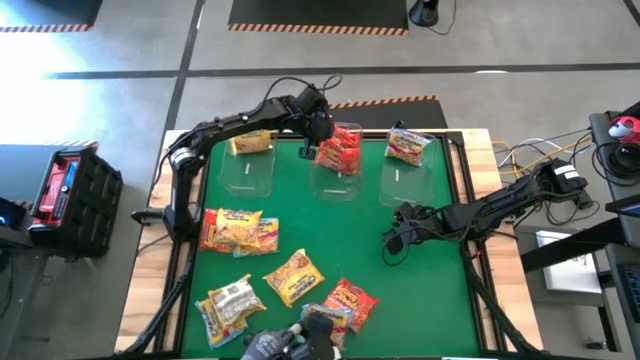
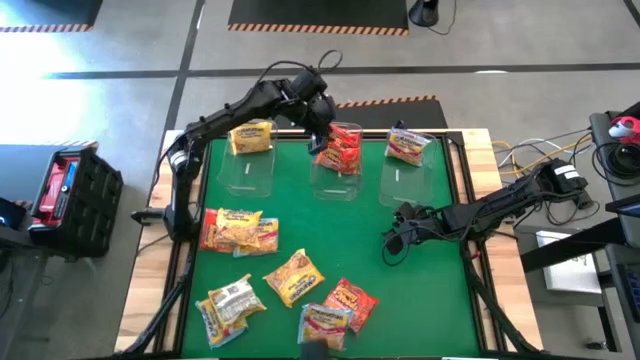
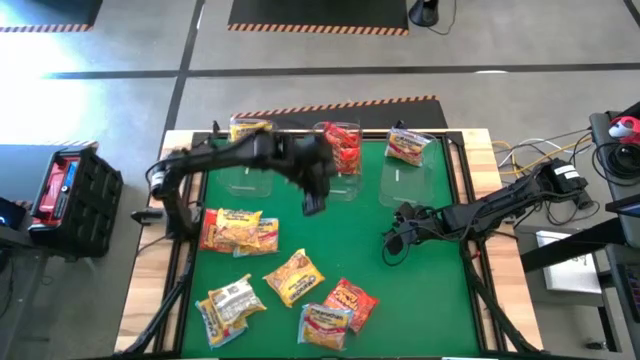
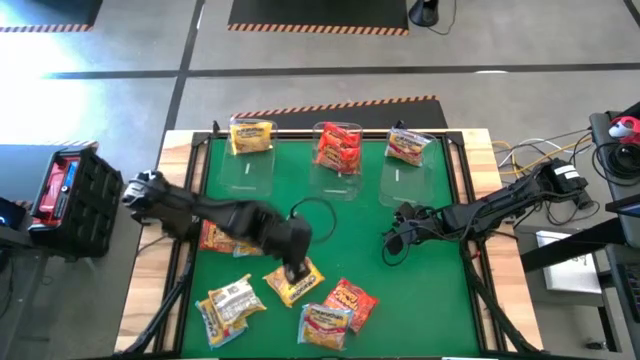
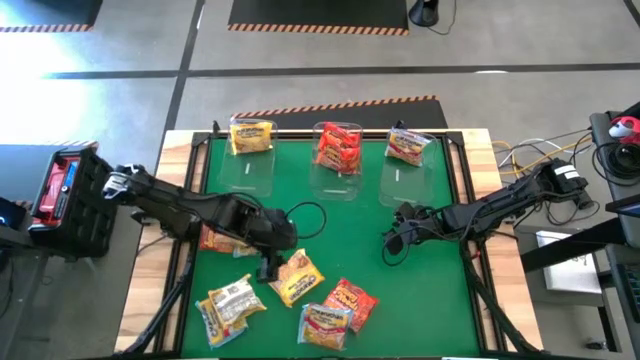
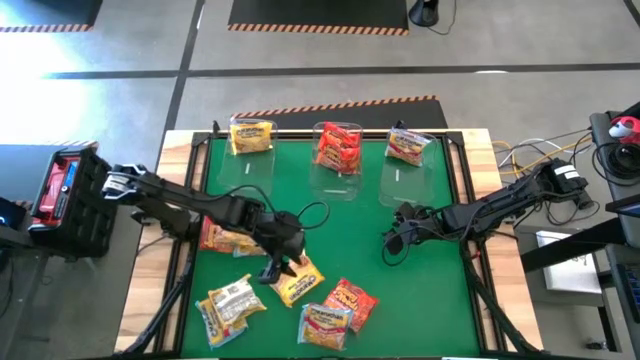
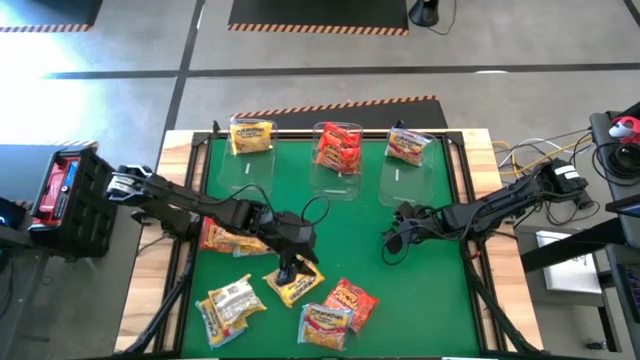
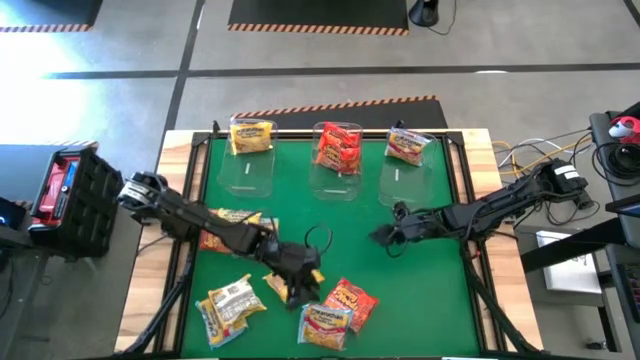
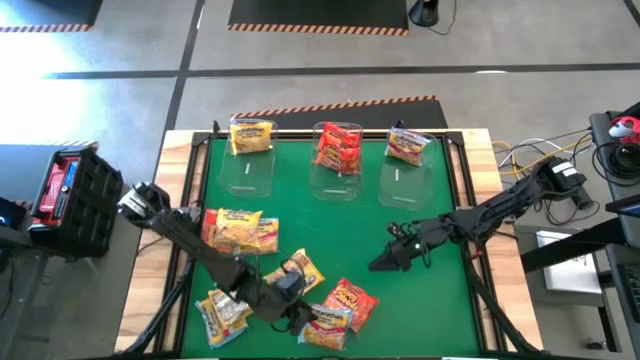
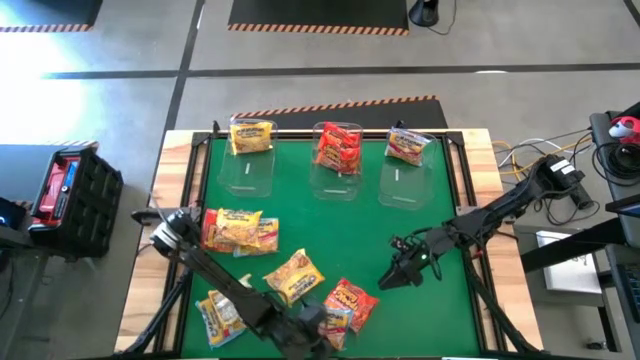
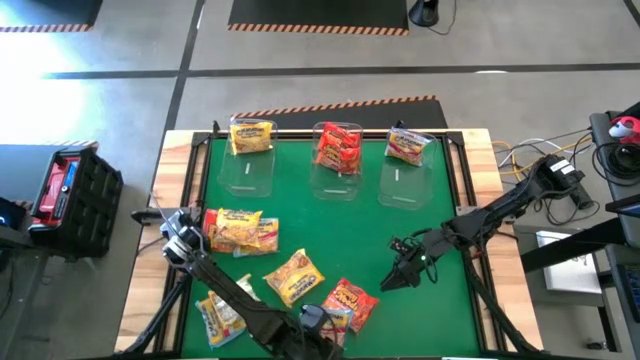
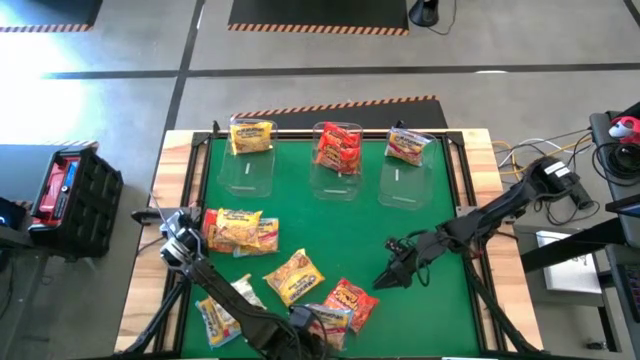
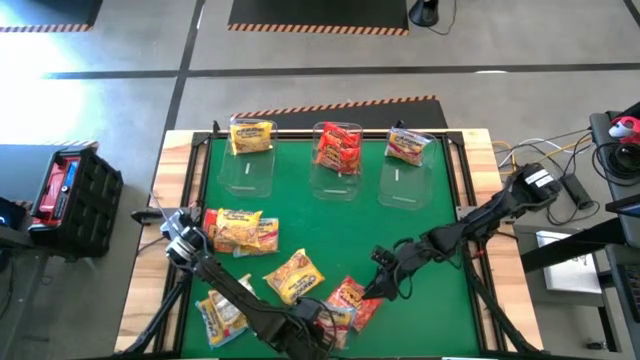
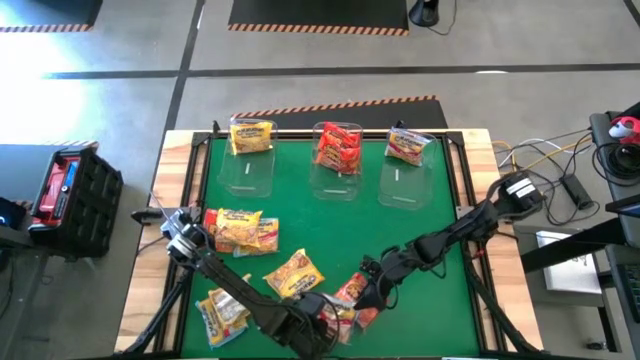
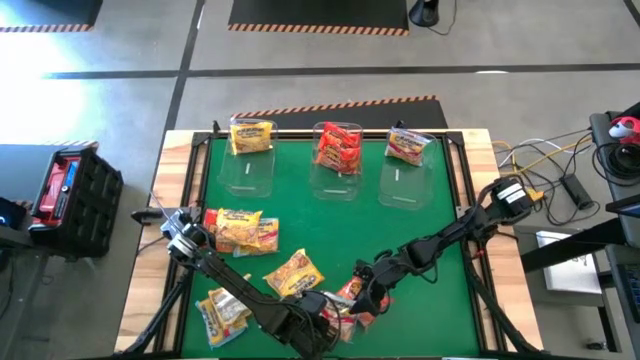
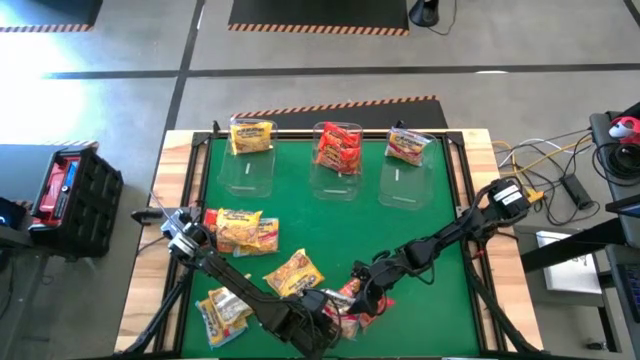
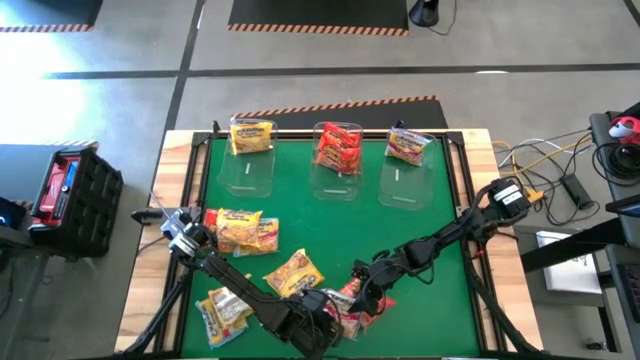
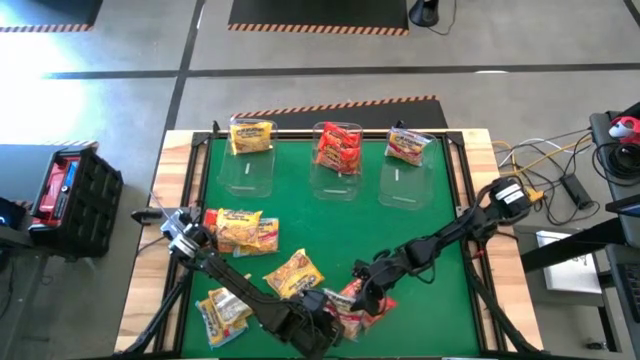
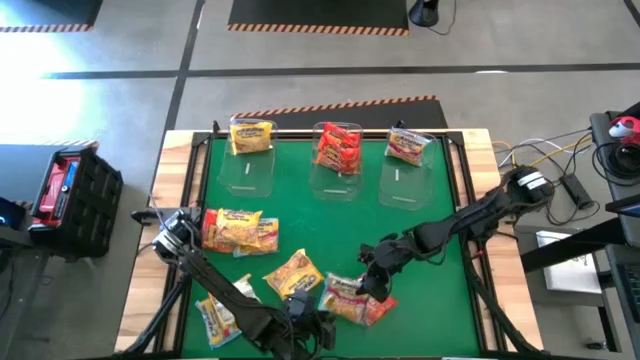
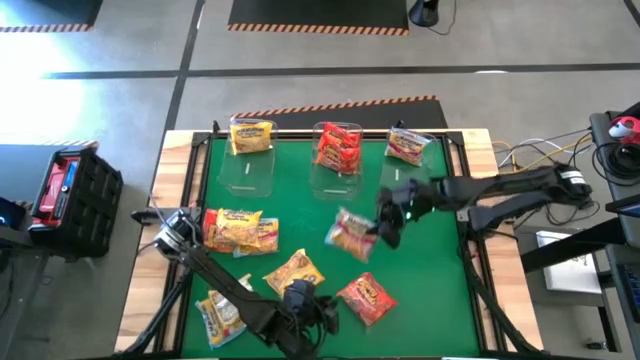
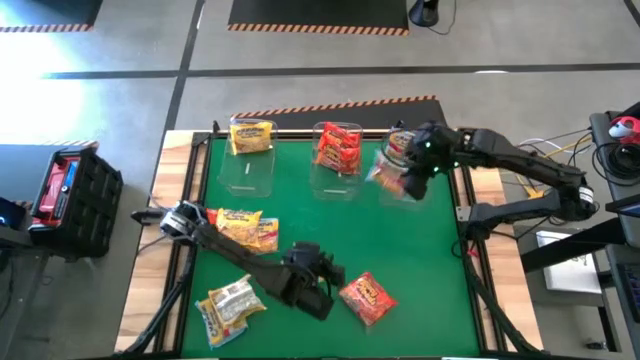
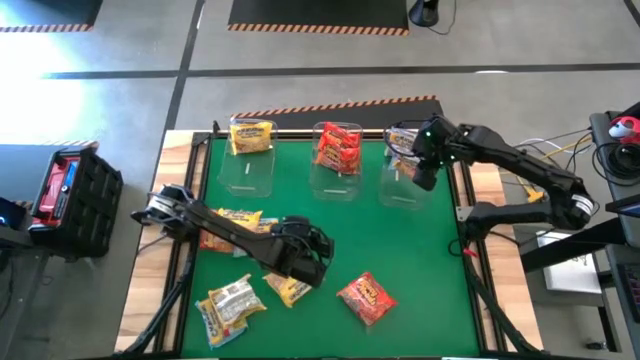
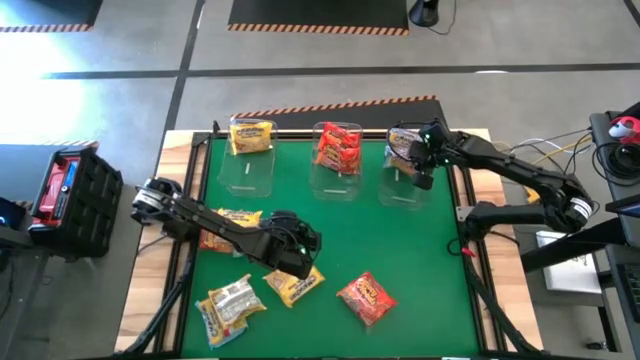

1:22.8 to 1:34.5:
Task: Sort Maruchan noodles
Put the blue noodle pack into the right transparent bin

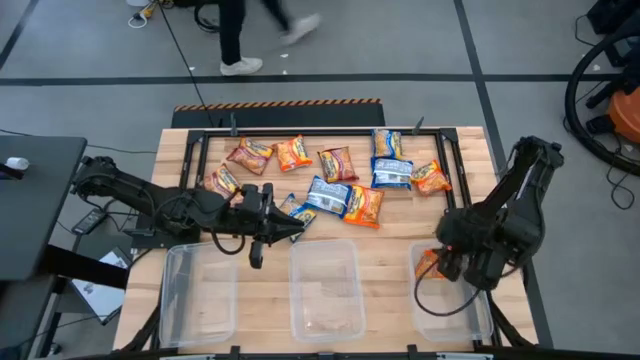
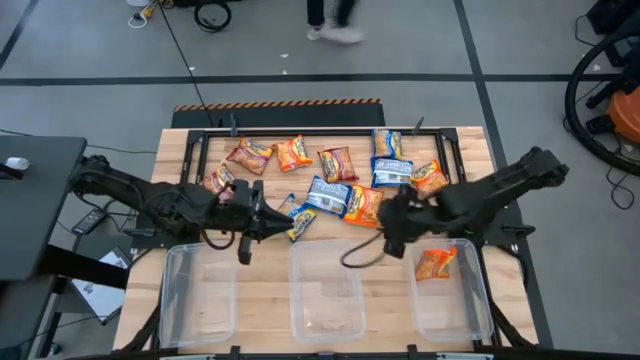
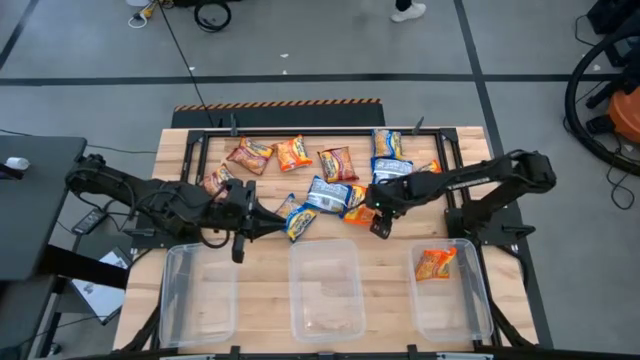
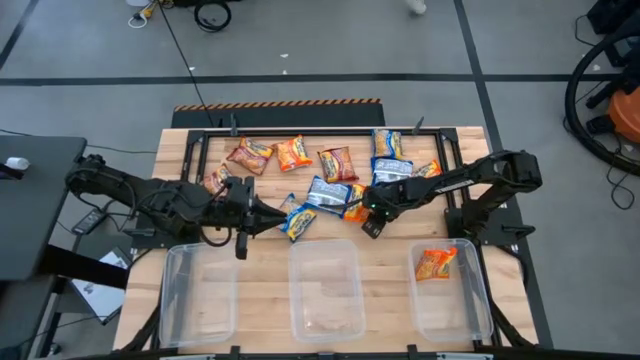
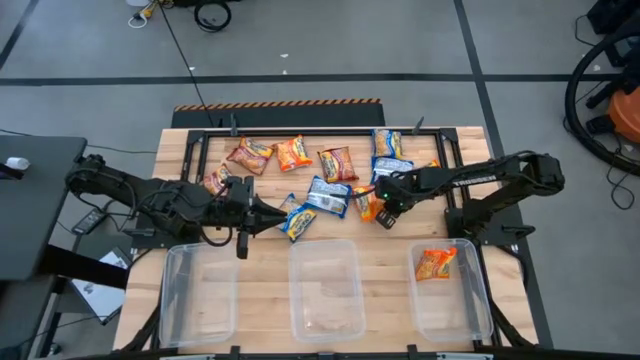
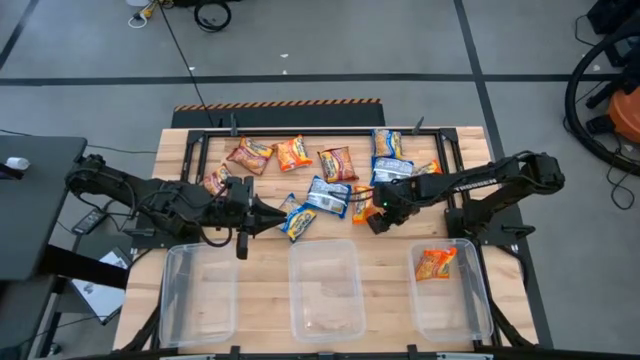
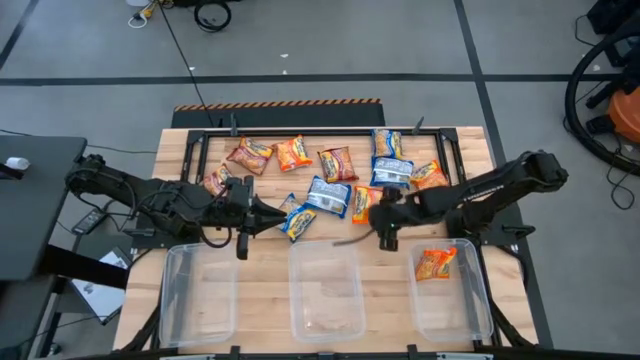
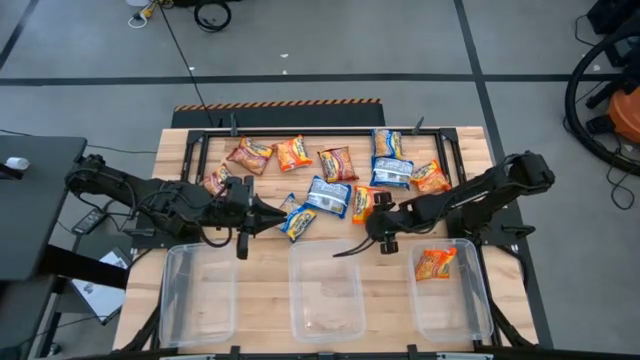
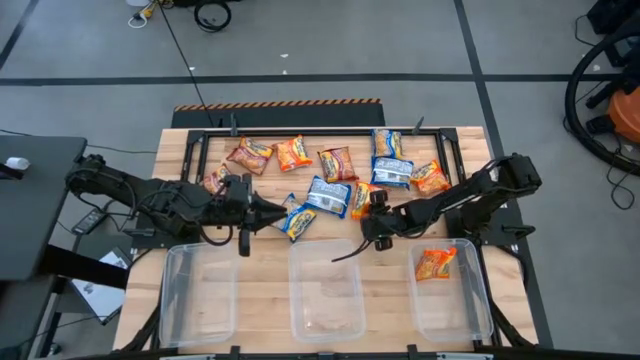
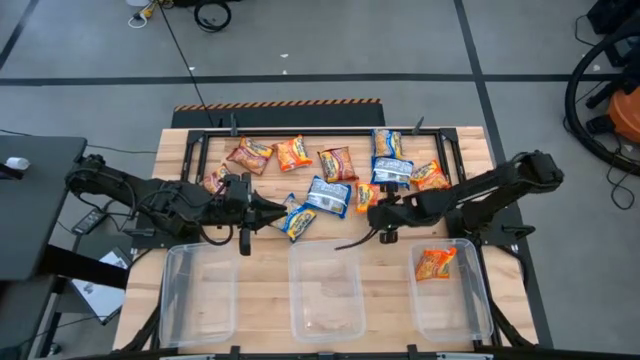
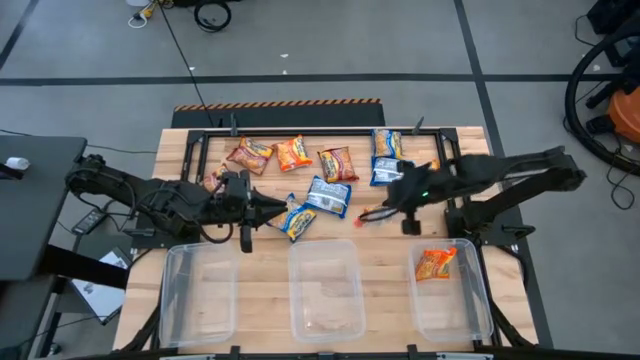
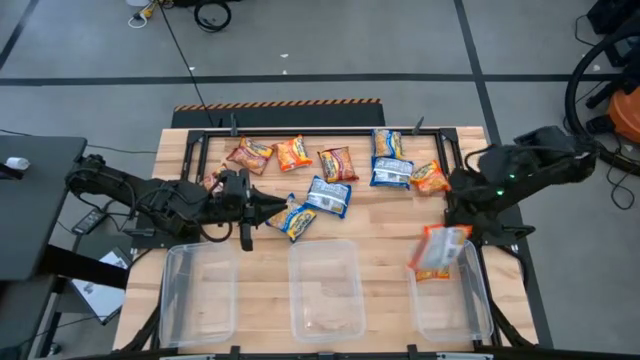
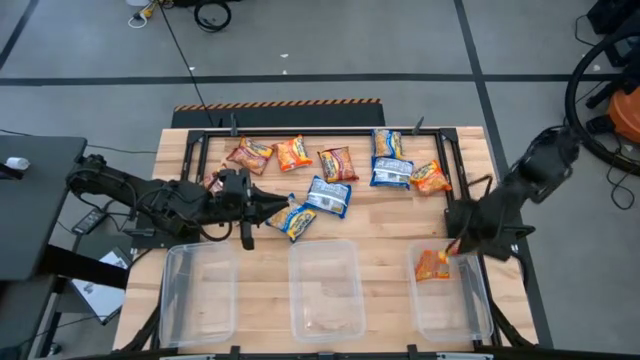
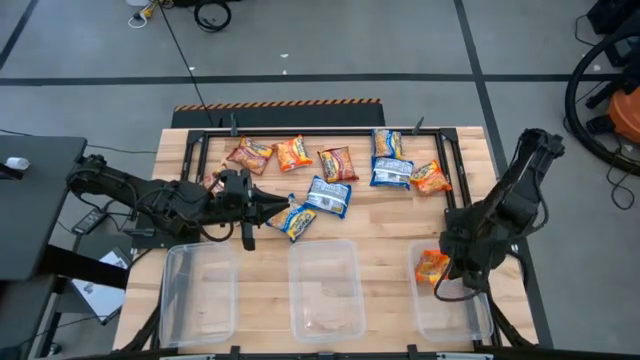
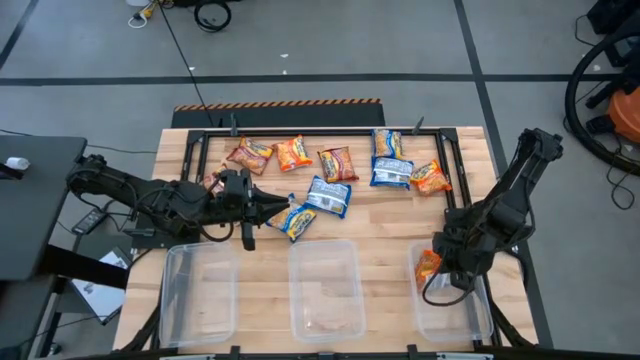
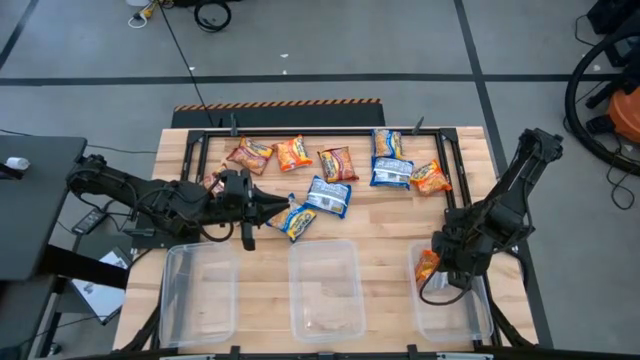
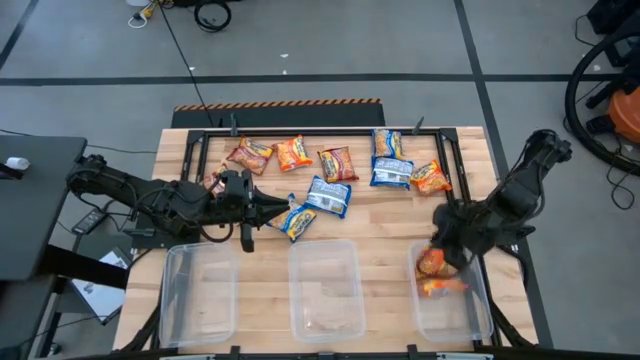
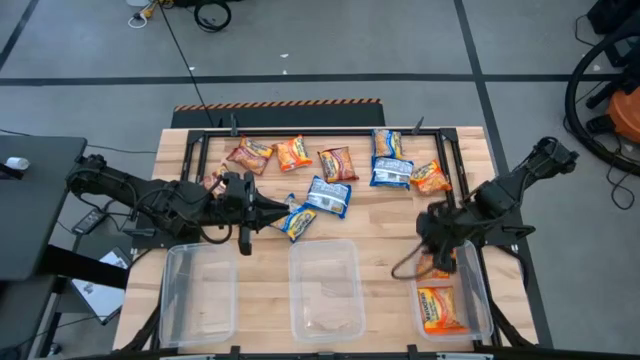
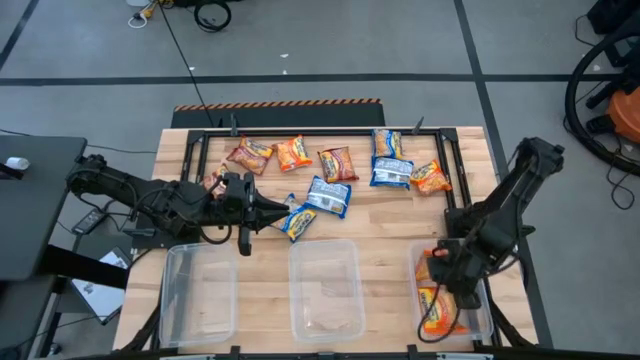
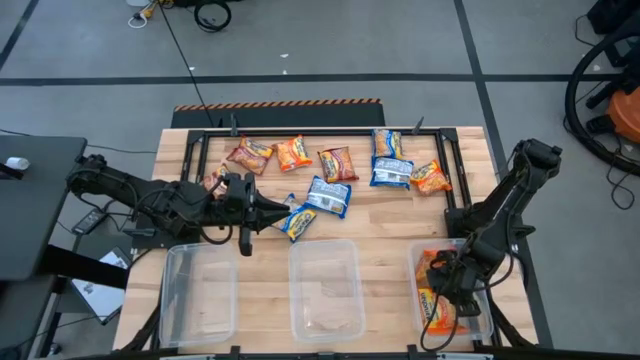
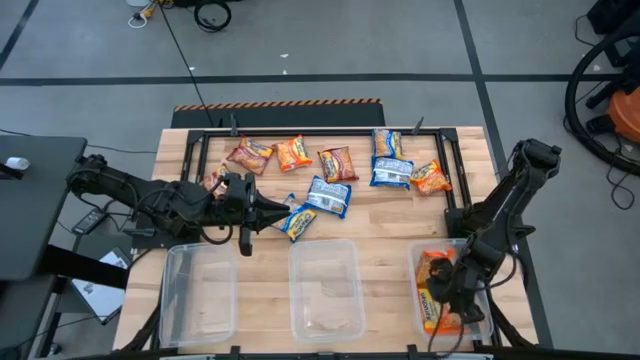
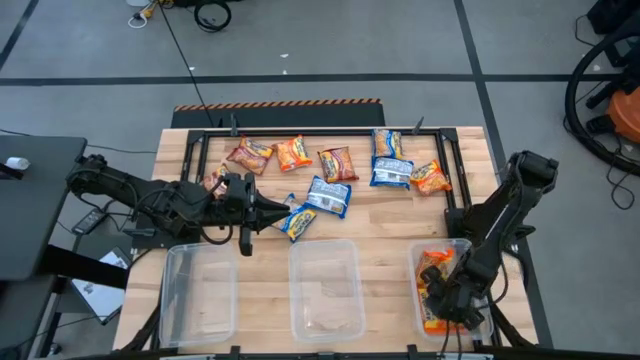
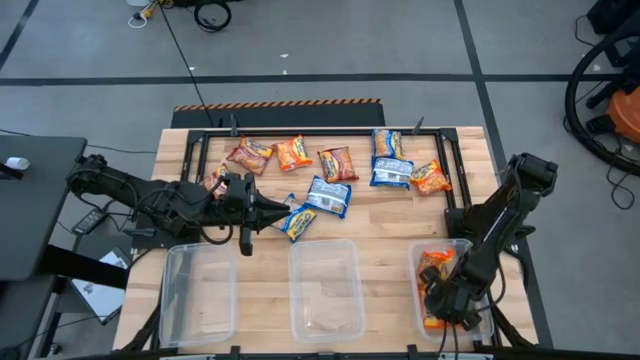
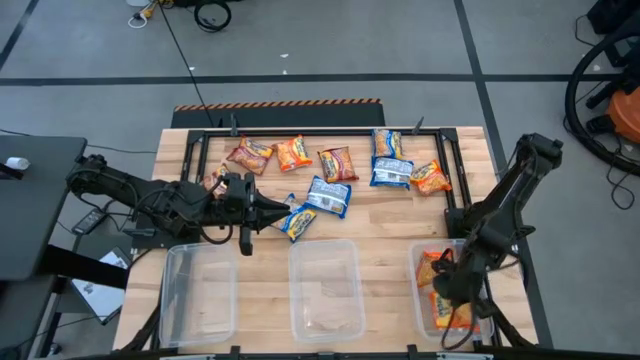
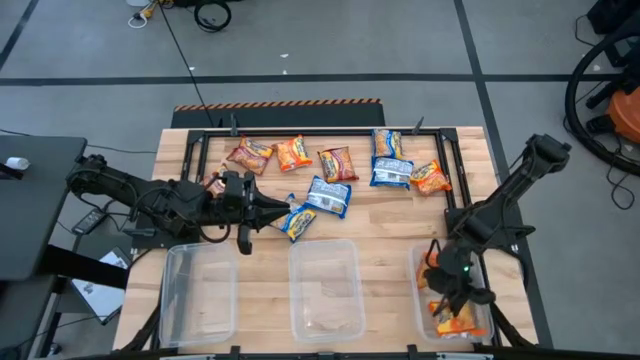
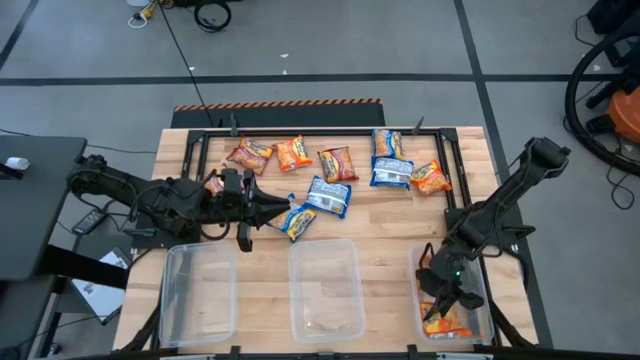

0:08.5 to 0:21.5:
Task: Sort Maruchan noodles
Put the bottom center orange noodle pack into the right transparent bin
